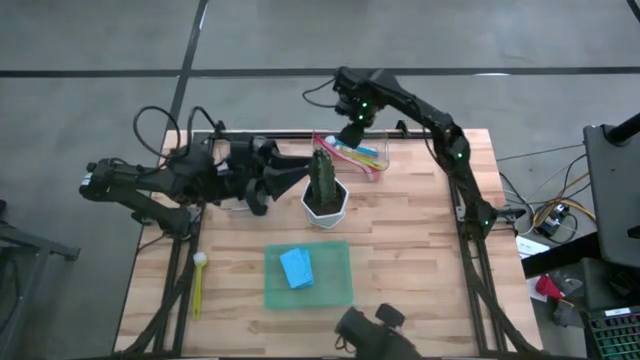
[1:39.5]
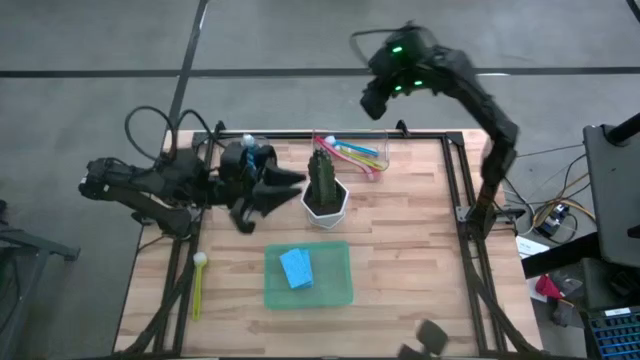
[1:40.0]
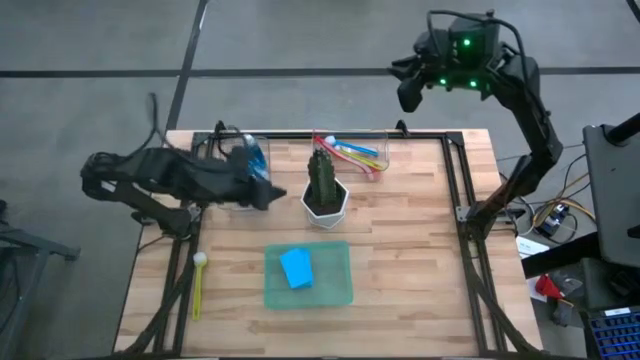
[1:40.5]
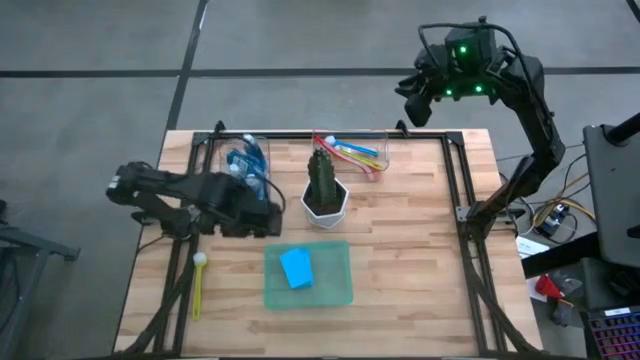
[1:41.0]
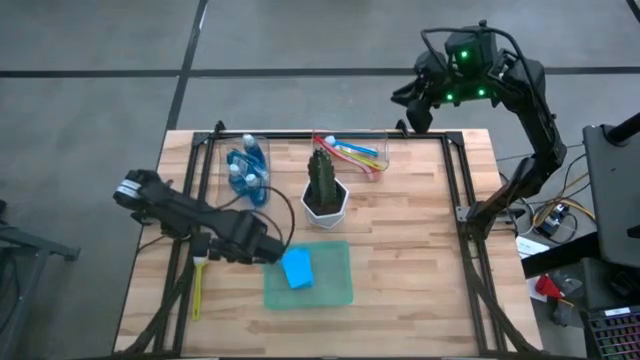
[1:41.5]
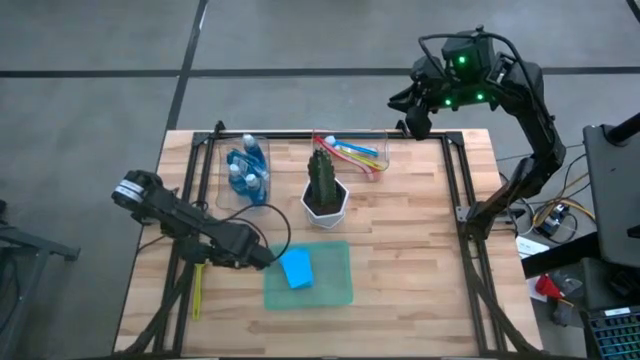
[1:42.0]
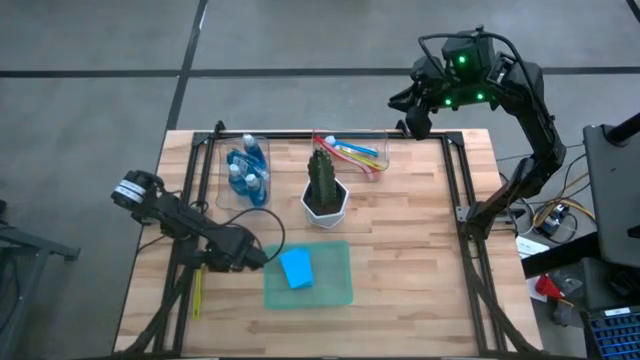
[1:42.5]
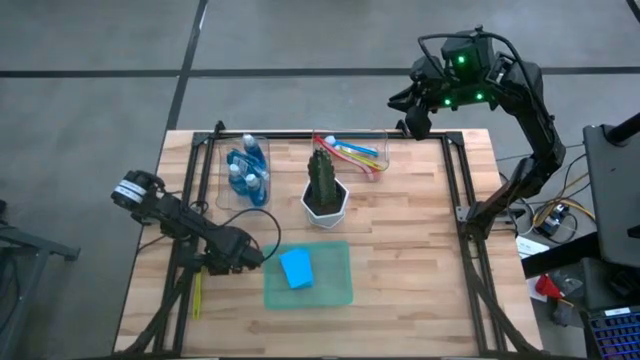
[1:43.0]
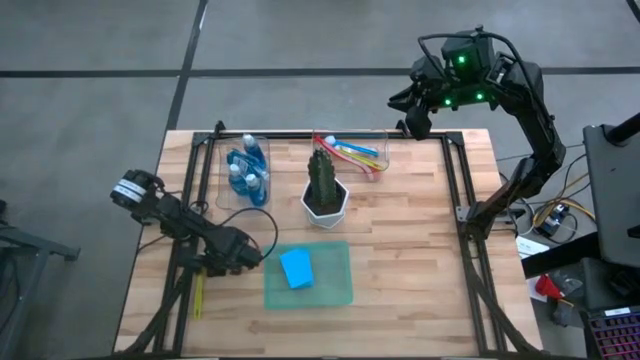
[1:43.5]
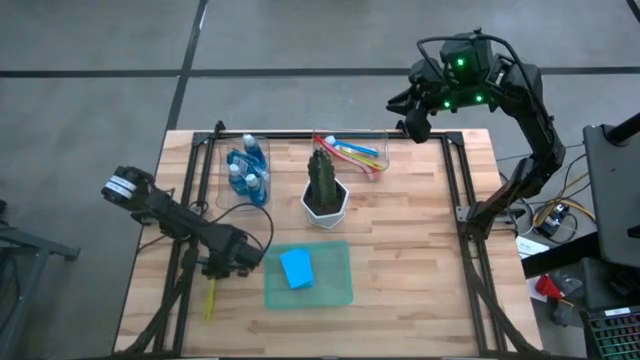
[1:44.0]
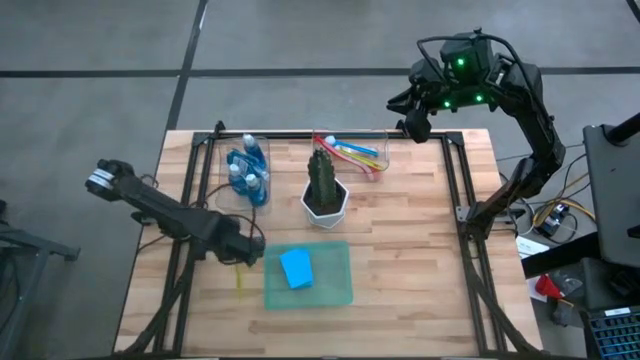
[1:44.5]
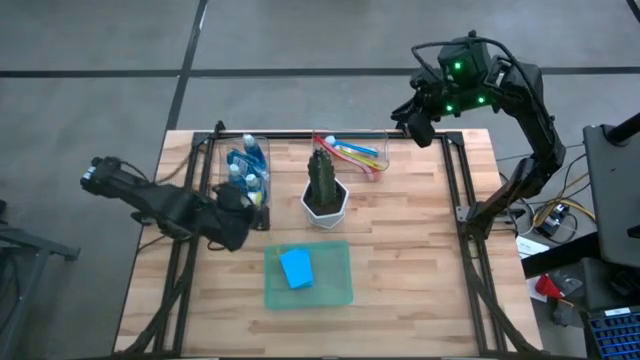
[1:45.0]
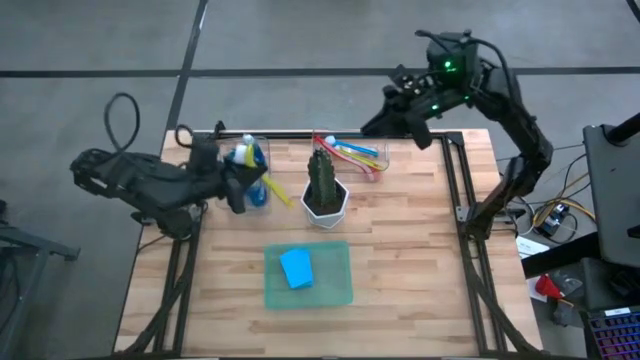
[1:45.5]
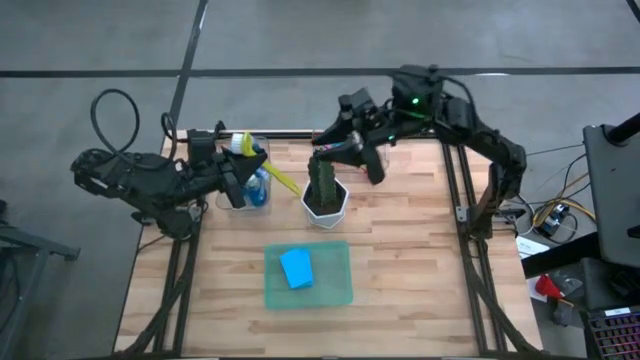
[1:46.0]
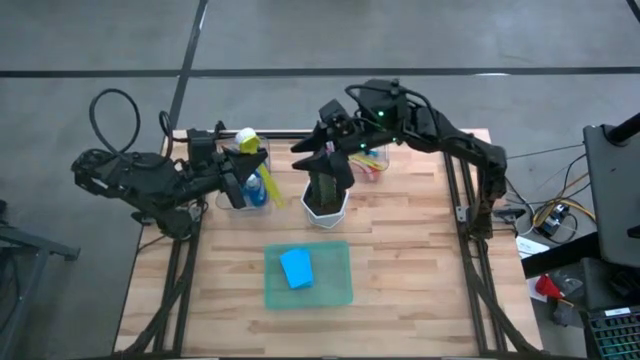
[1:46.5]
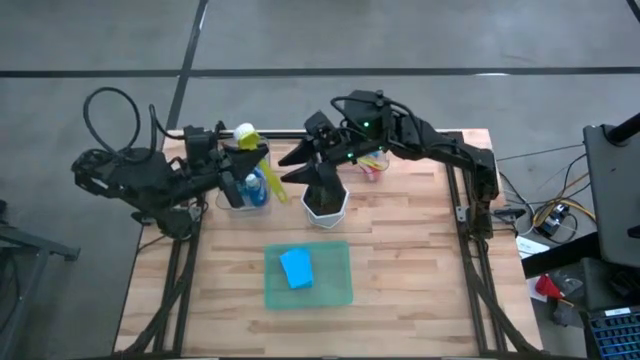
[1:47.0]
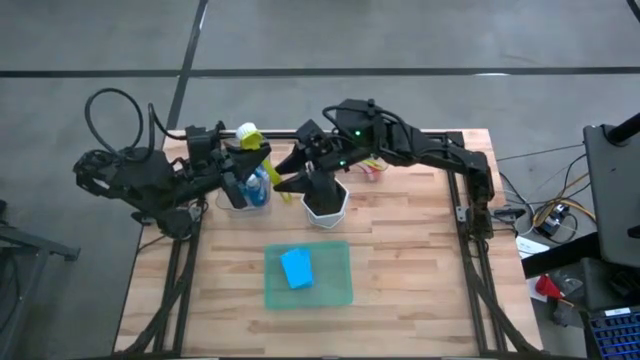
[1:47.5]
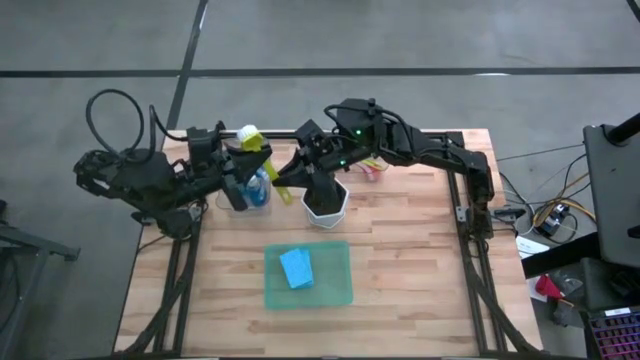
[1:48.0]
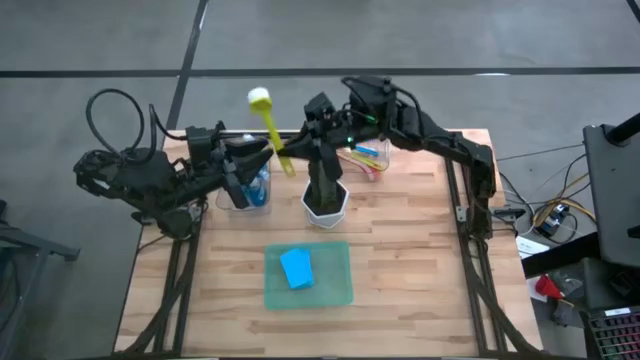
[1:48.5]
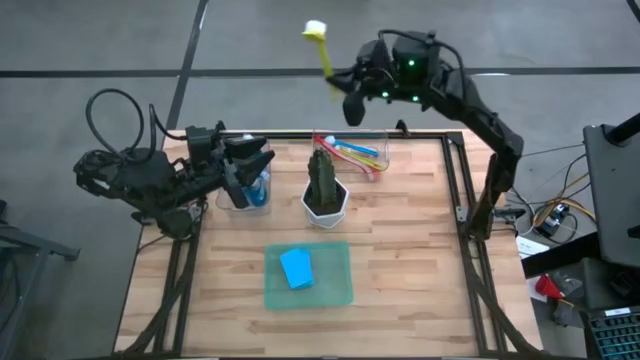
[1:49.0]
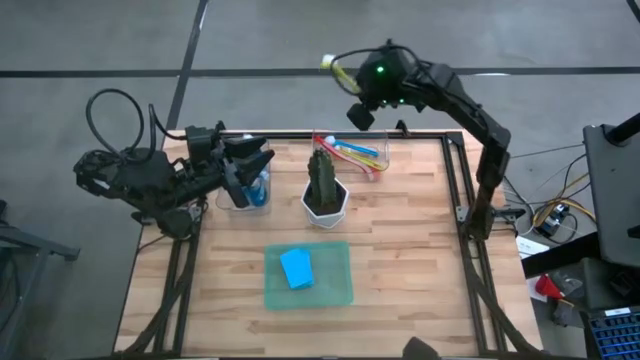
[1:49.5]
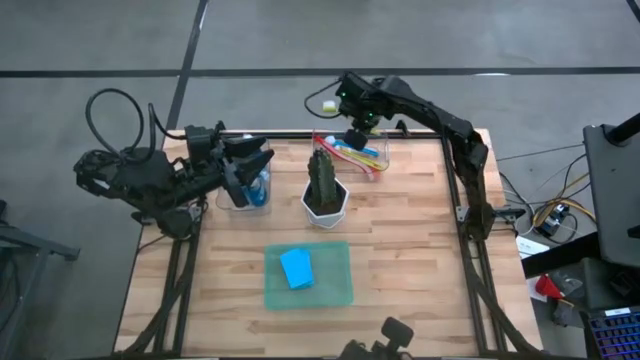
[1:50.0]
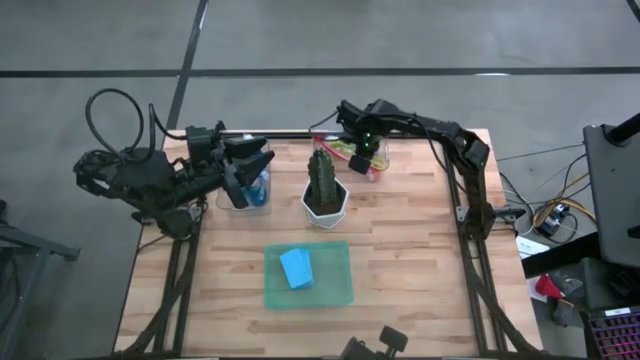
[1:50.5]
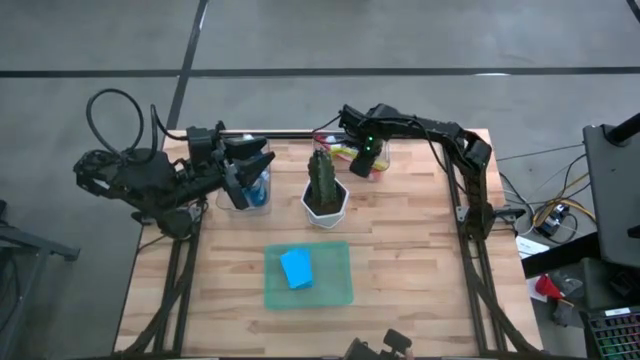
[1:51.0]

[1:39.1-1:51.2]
Task: Pick & Place Kitchen Sink Supplies
Put the green dish brush into the right transparent bin

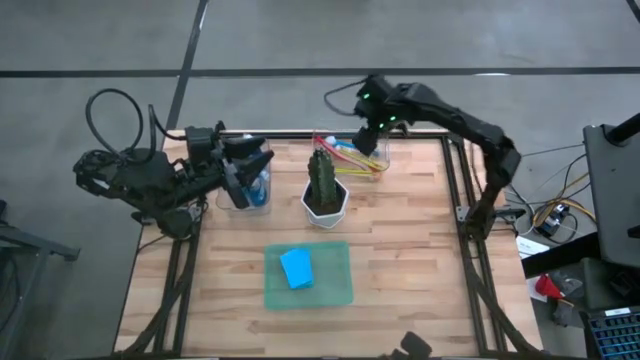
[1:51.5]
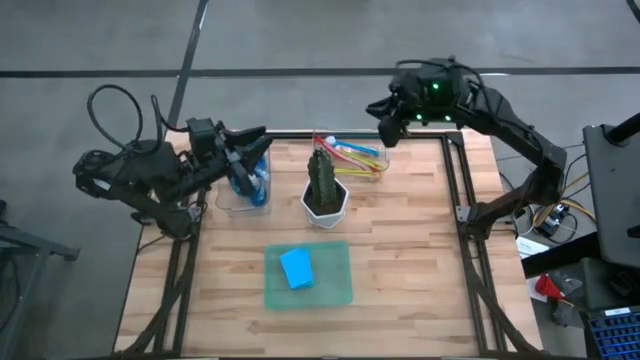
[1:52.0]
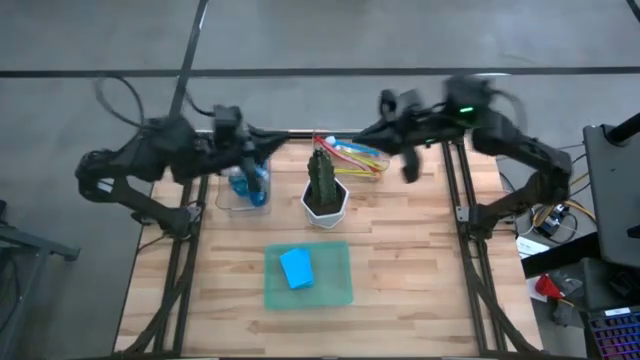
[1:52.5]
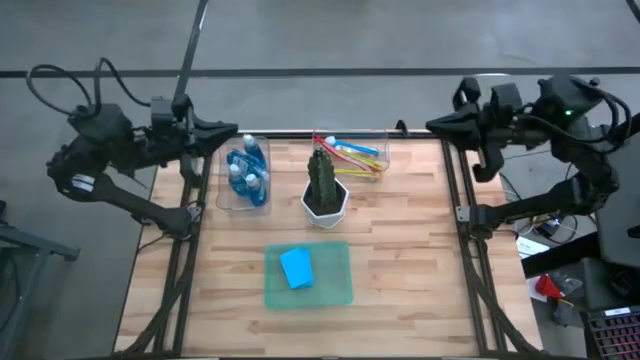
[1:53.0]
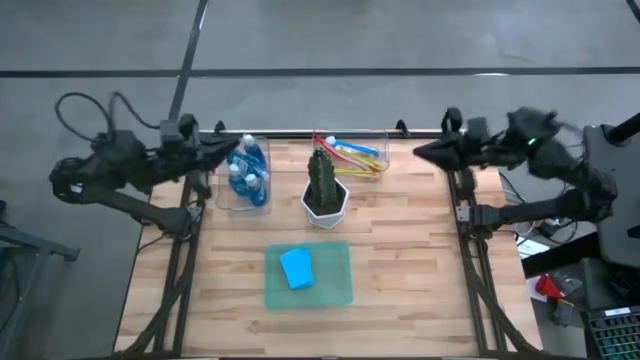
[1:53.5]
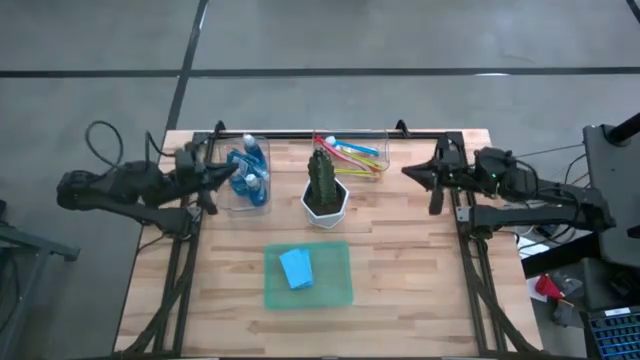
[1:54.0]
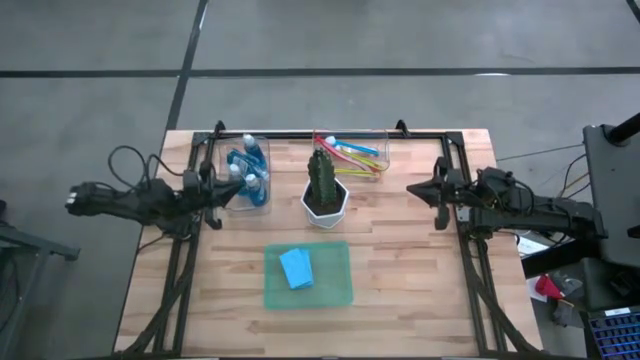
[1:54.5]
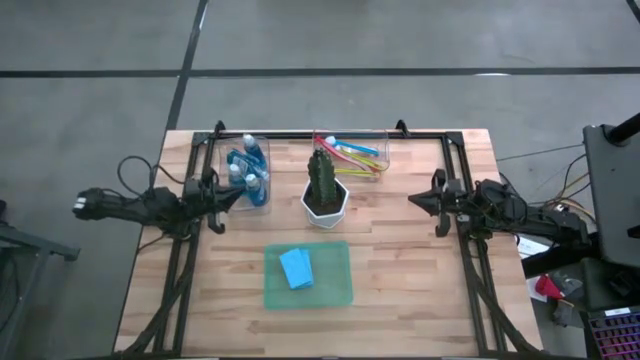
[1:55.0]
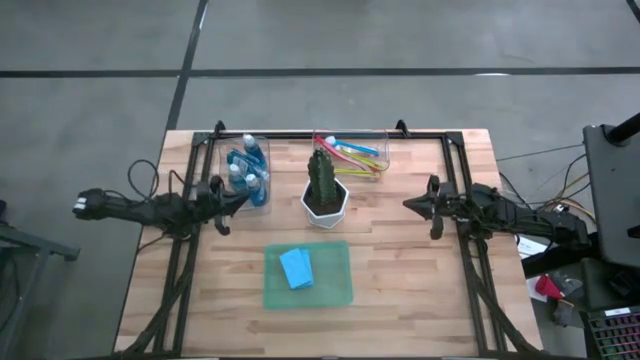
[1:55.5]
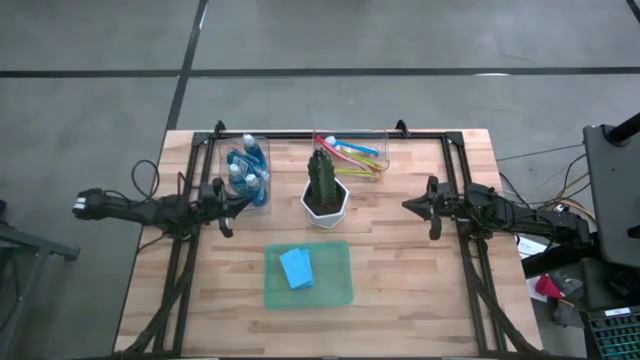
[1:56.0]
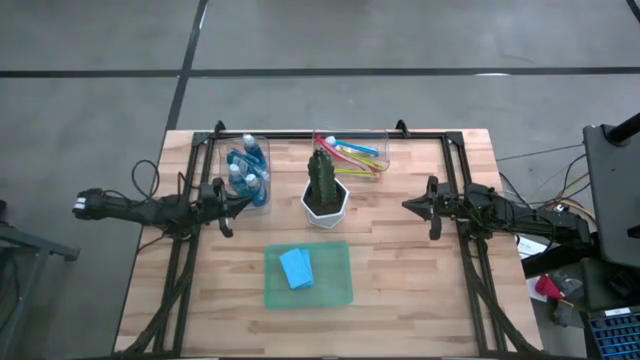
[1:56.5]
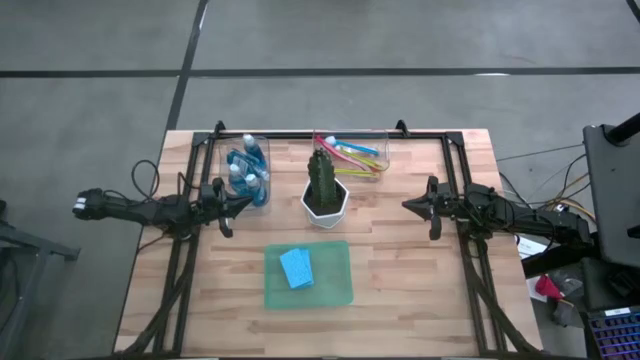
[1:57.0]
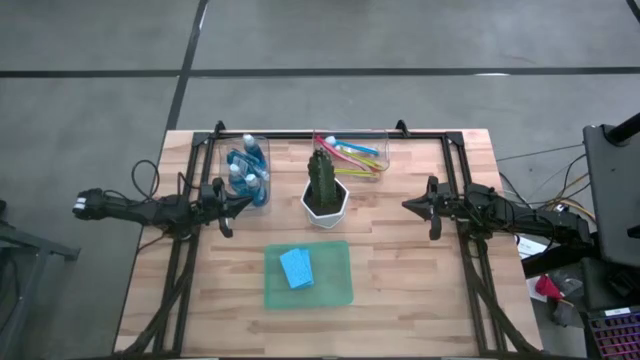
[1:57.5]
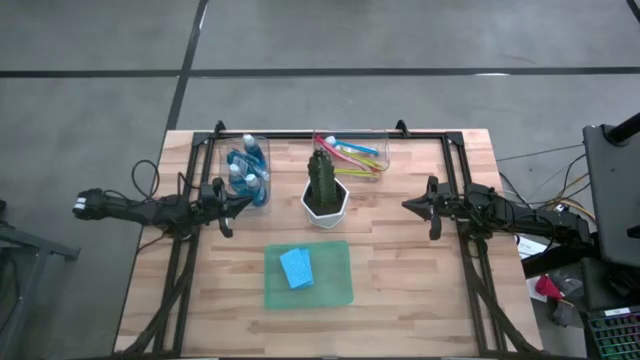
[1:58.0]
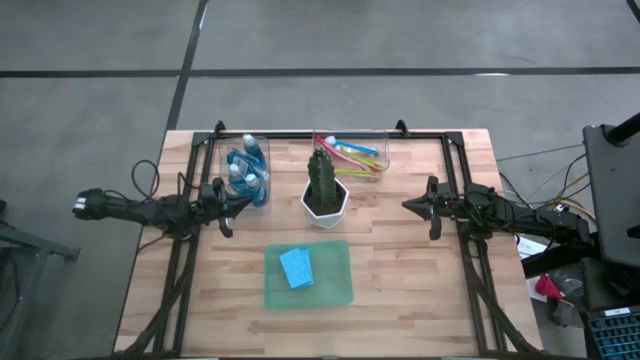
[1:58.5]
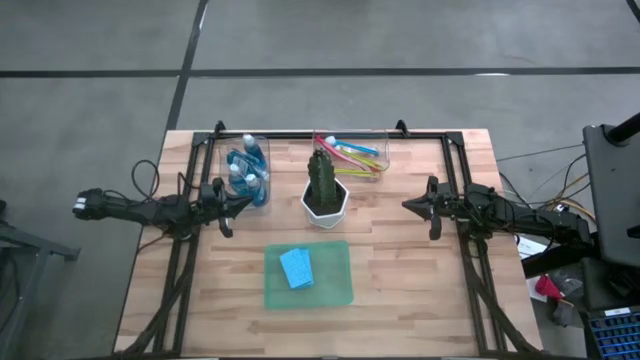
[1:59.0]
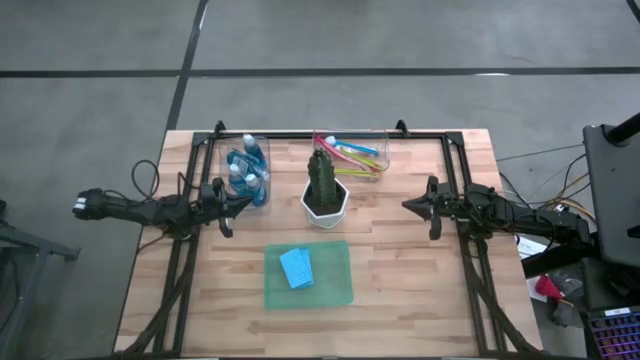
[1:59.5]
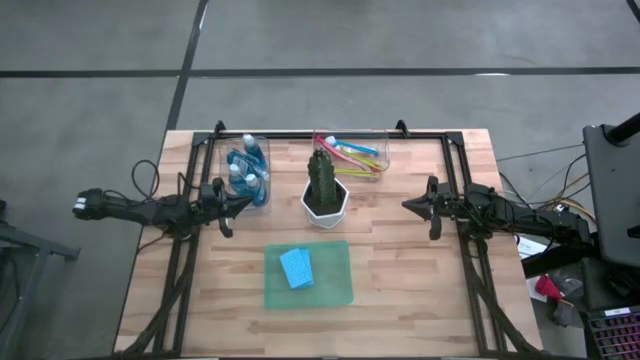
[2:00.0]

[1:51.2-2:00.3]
Return to Home Position

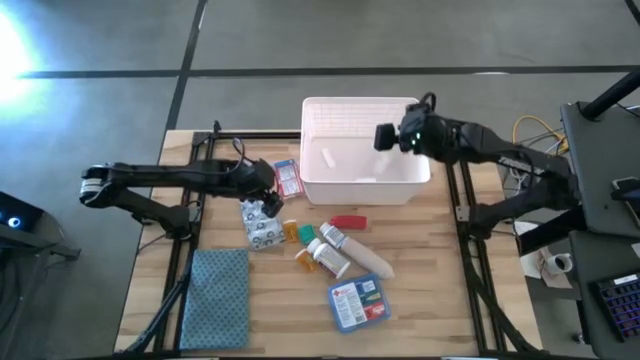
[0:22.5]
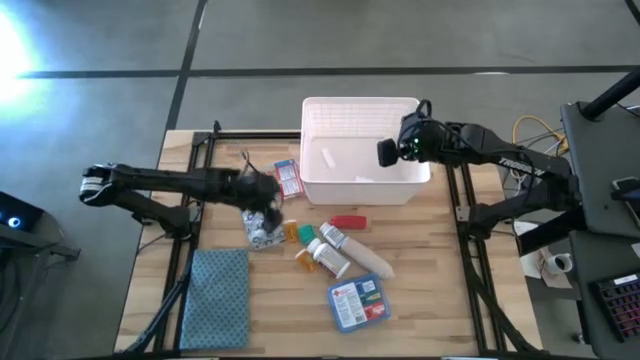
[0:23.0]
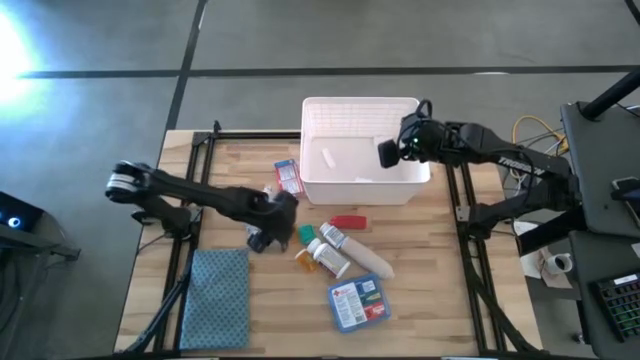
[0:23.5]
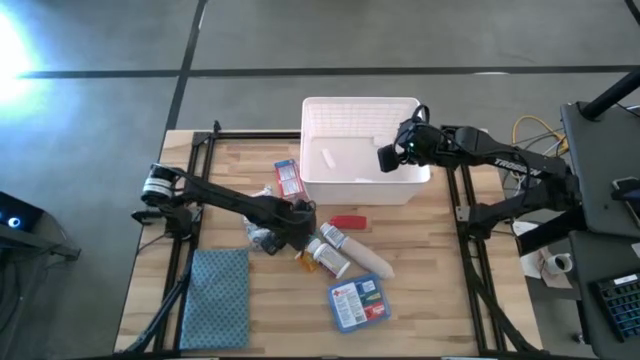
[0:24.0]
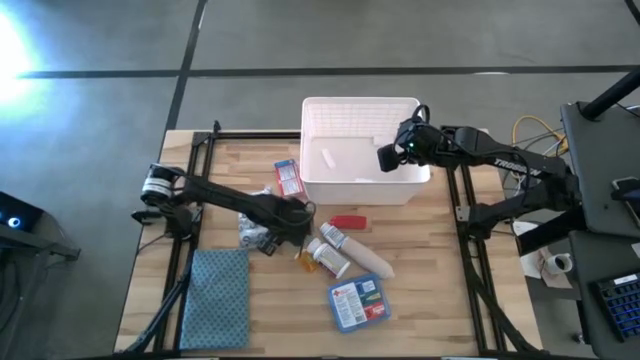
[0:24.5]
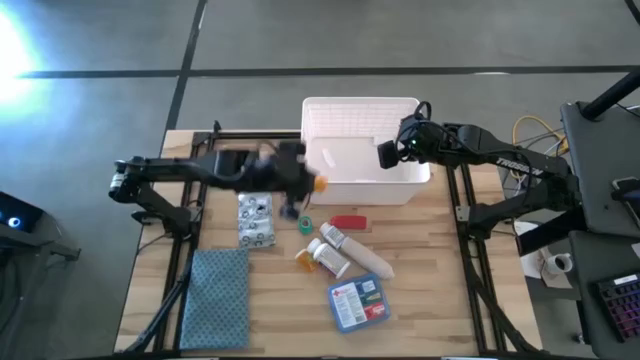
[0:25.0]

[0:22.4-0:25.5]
Task: Pick & place medical supplies in basket/bin
Put the orange medicine bottle into the bin
